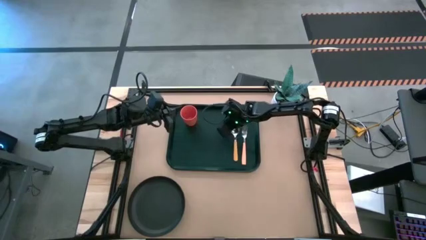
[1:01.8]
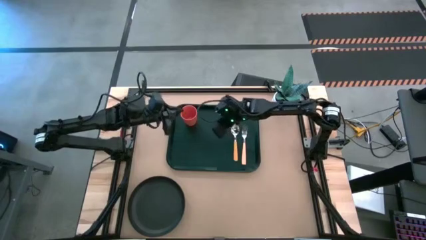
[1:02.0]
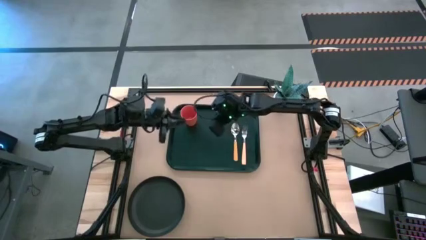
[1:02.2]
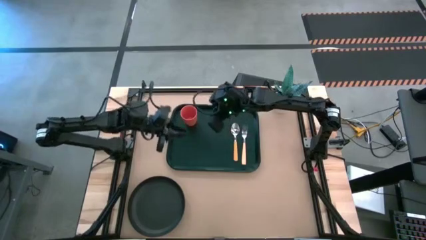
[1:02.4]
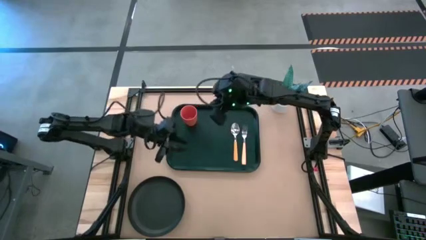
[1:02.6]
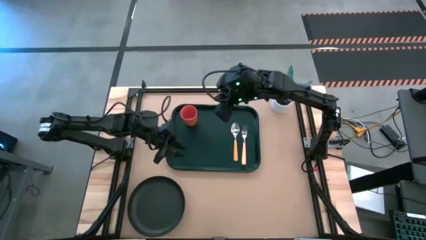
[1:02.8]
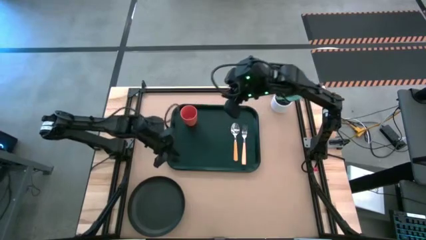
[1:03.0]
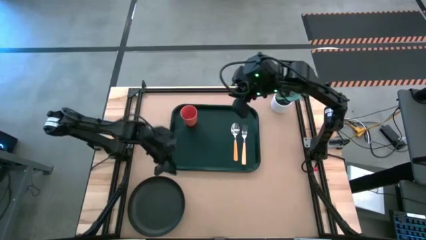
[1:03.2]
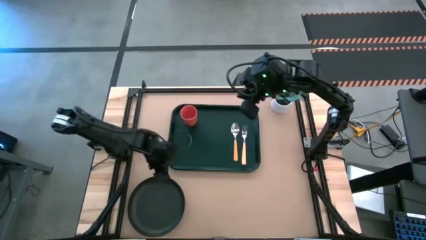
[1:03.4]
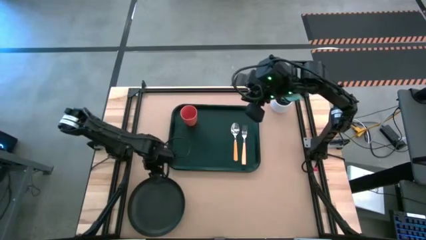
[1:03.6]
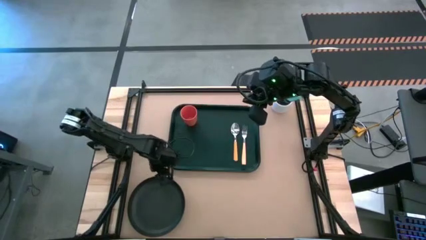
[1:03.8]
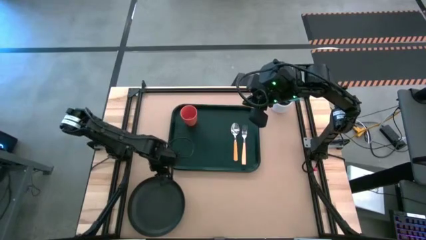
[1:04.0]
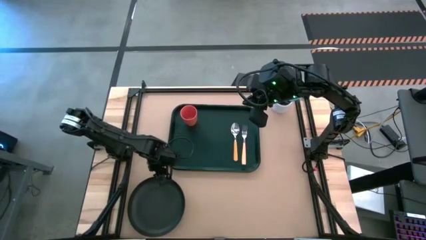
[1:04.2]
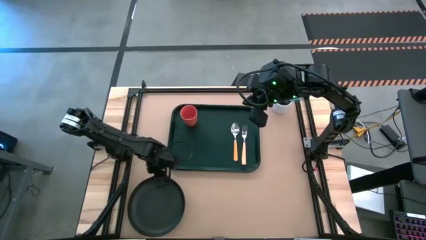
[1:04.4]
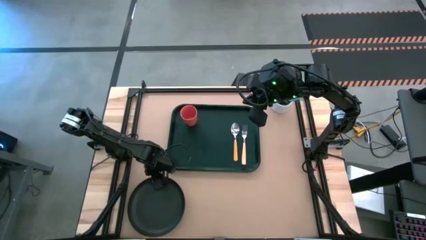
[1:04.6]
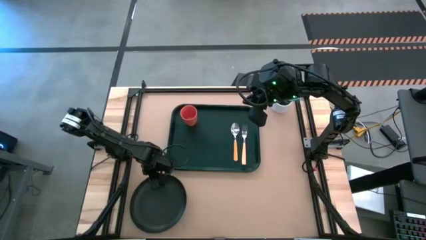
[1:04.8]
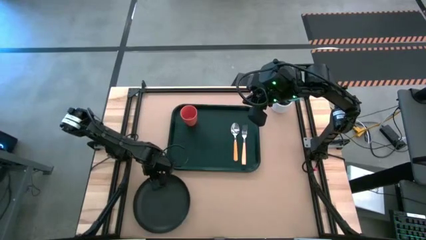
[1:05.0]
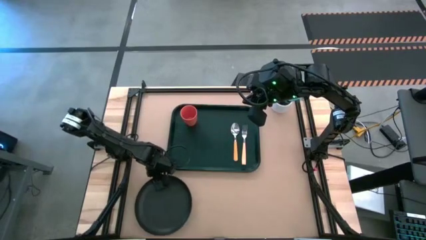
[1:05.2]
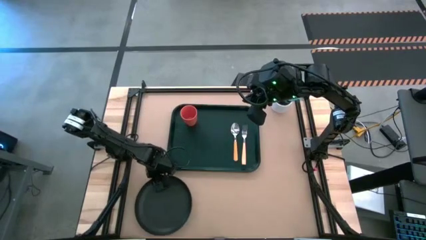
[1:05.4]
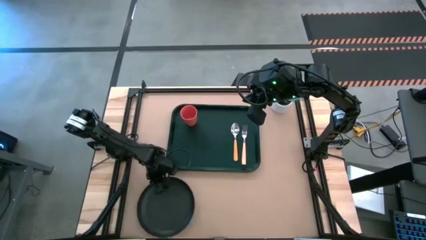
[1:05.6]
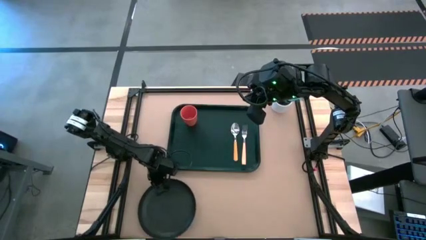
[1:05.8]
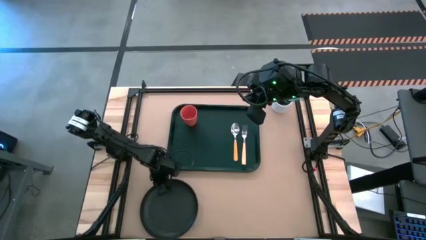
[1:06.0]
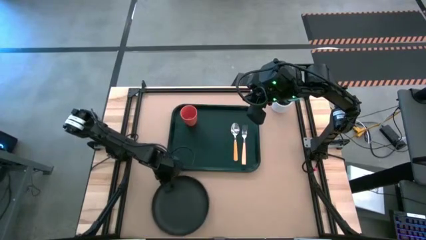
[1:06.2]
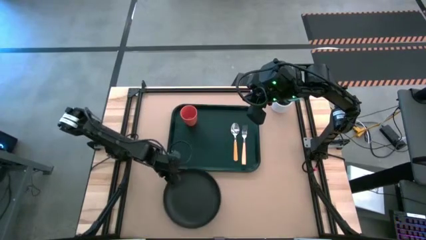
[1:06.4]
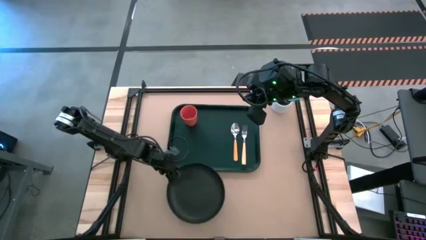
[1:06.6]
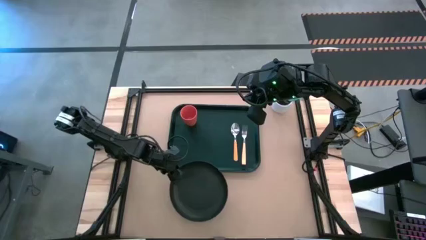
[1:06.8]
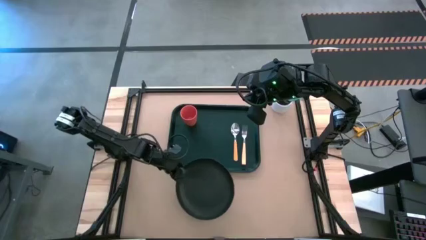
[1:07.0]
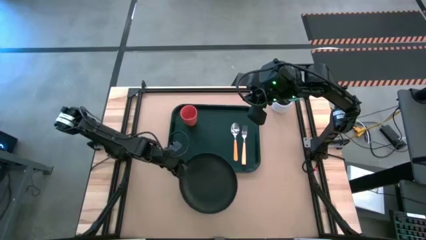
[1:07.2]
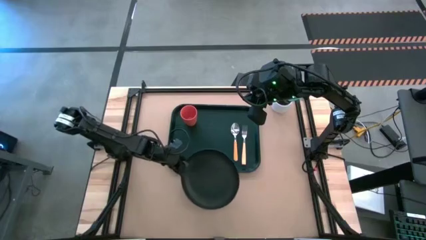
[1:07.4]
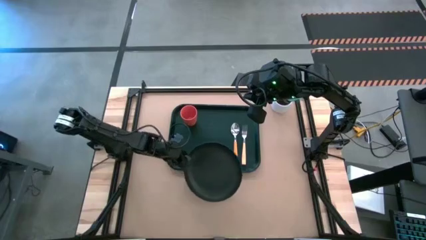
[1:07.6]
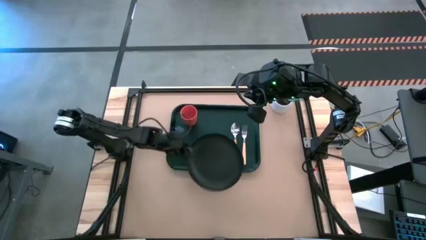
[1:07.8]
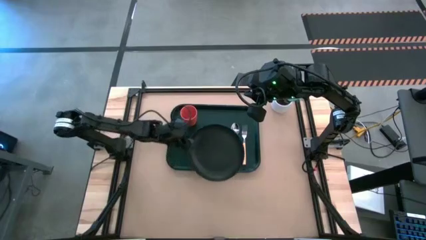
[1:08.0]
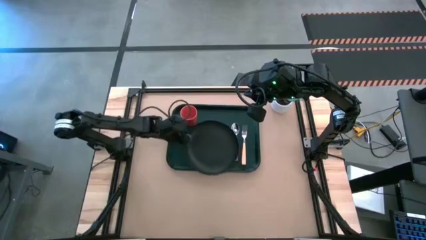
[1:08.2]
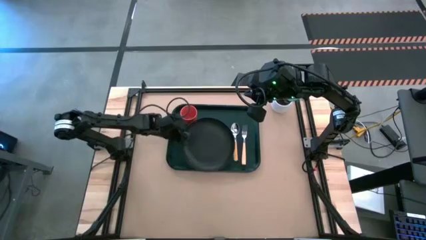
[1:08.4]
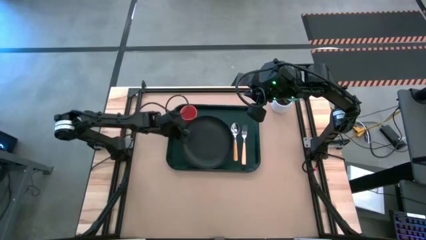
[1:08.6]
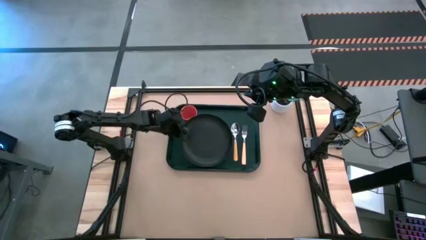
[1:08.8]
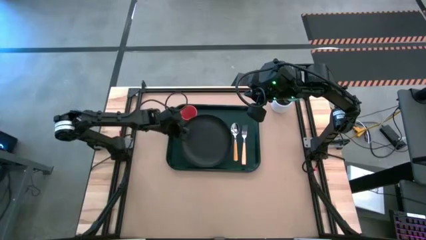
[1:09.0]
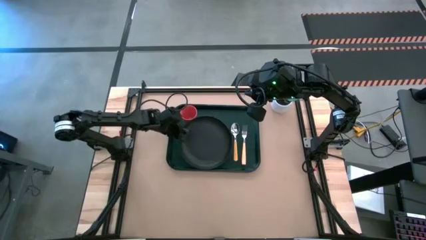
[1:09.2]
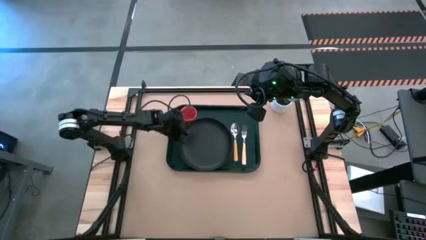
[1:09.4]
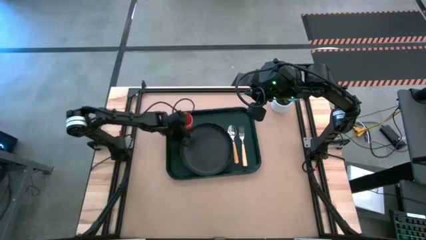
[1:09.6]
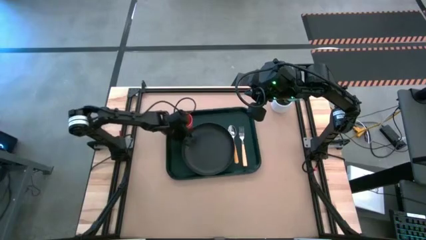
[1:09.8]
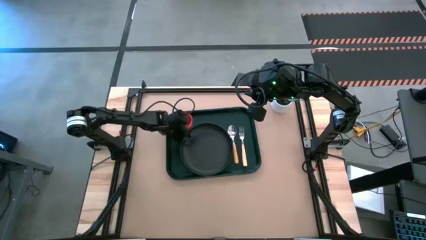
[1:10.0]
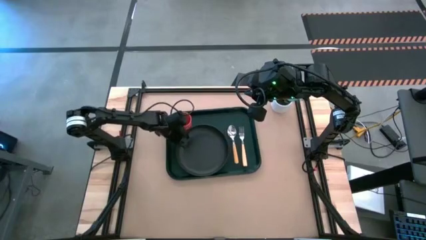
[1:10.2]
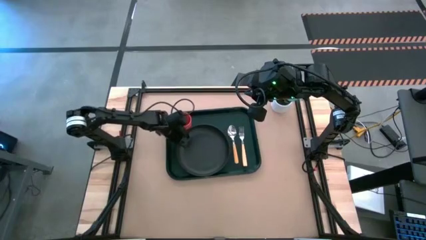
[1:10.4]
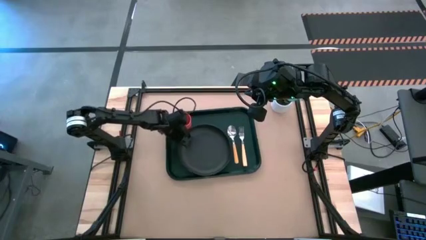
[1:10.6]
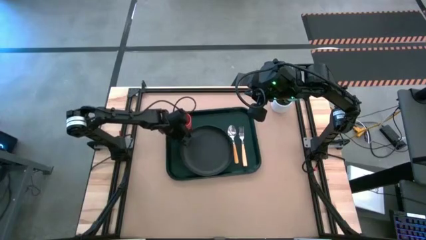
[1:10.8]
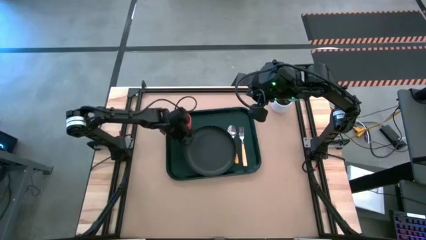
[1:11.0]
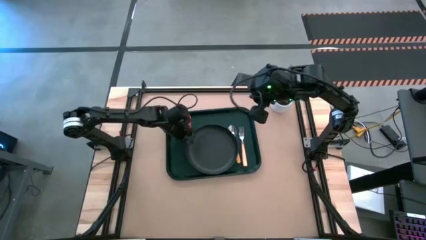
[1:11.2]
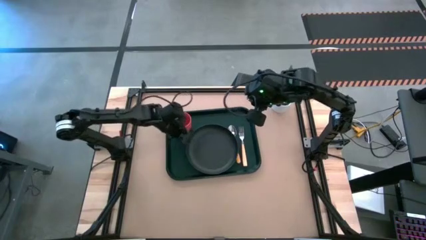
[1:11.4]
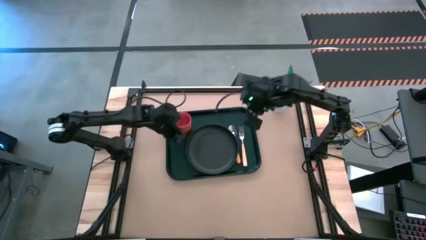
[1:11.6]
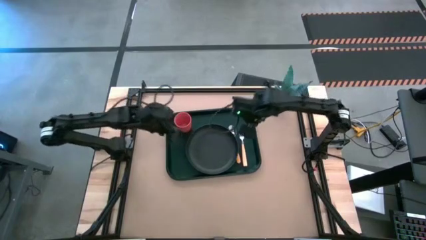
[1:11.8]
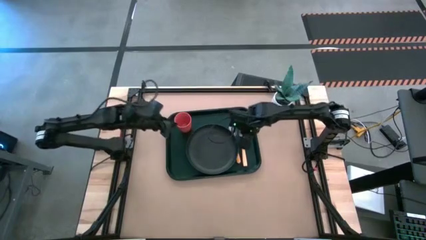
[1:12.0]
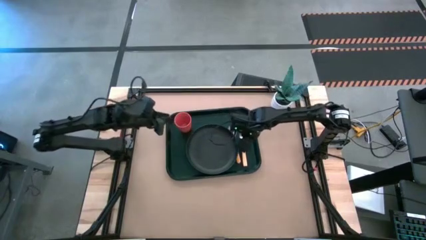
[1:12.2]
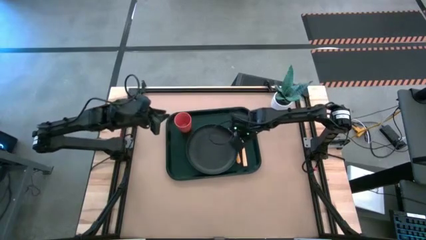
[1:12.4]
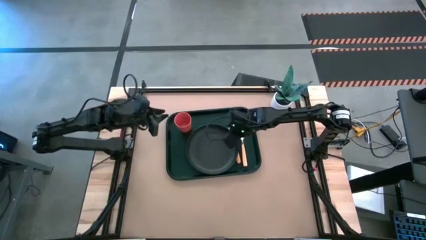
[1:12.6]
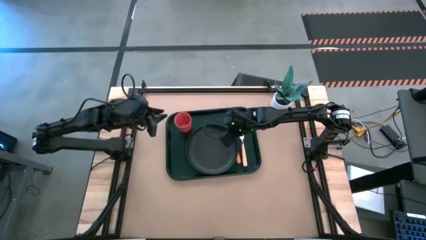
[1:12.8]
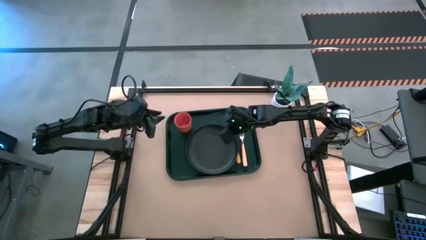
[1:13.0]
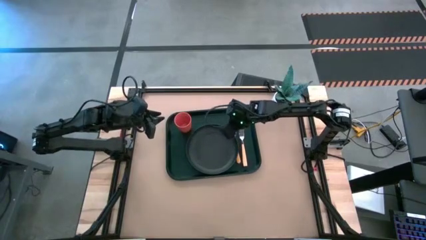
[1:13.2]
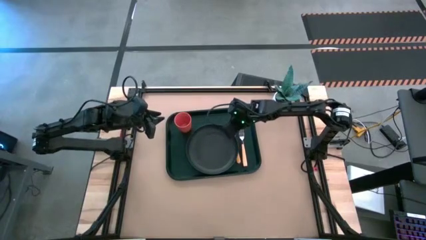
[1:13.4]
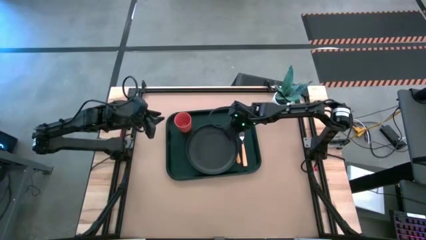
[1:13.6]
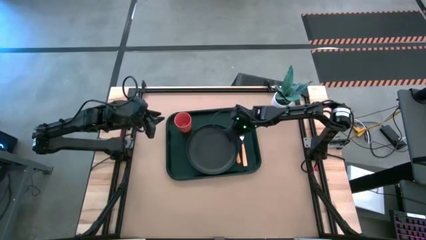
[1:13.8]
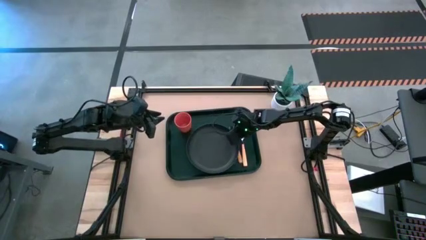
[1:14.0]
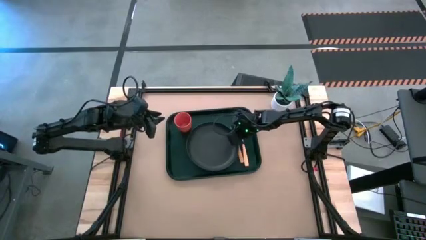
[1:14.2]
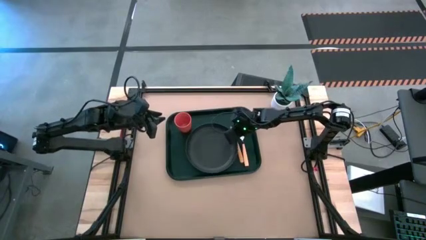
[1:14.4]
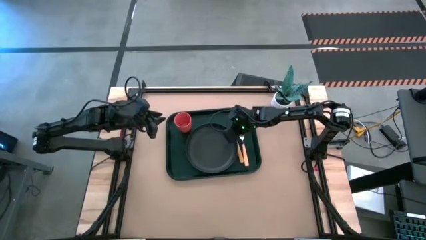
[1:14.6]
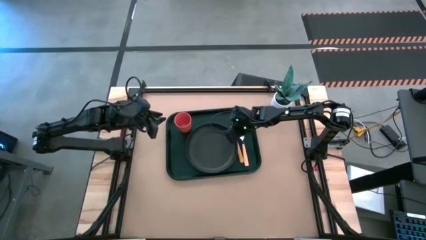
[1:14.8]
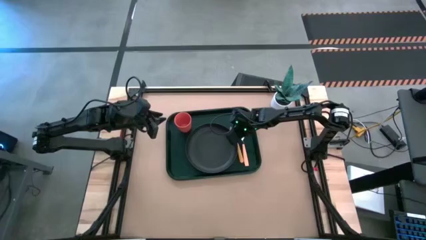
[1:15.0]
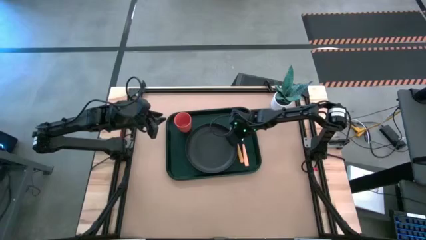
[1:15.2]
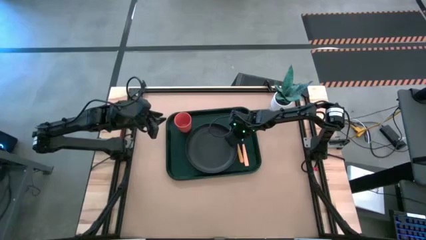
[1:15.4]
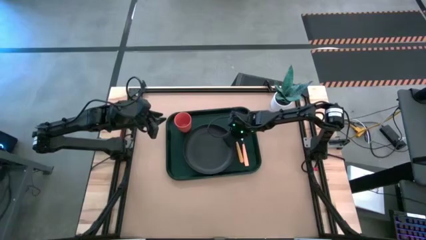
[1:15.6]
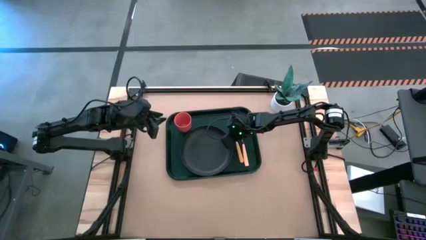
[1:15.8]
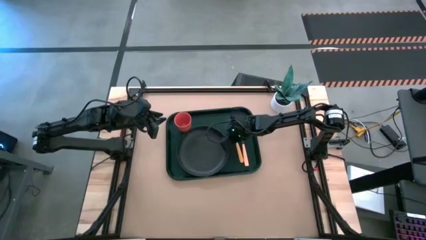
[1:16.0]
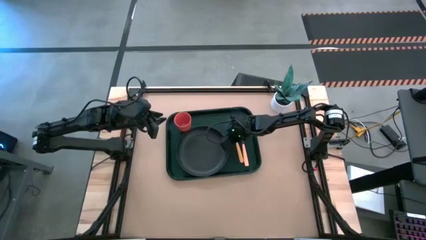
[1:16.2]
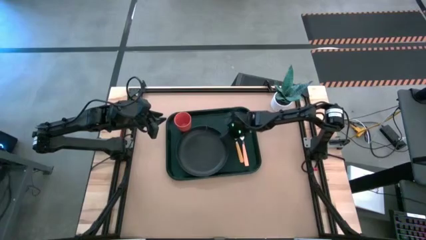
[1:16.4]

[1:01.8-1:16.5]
Task: Pick and place plate/cup/fork/spoon on tray
Put the black plate on the black tray

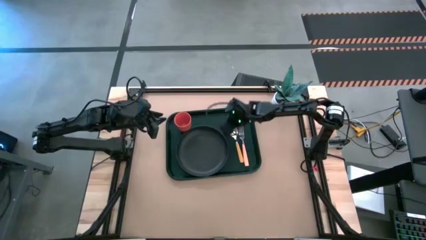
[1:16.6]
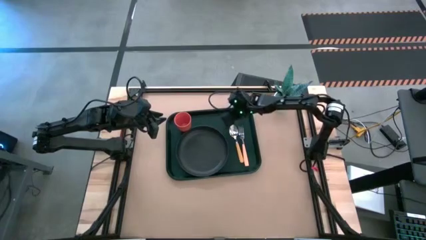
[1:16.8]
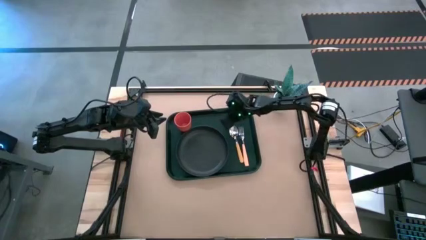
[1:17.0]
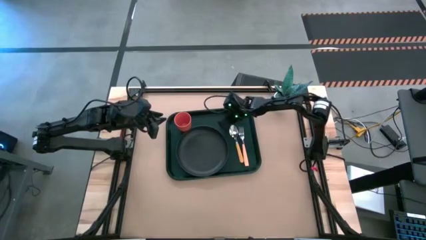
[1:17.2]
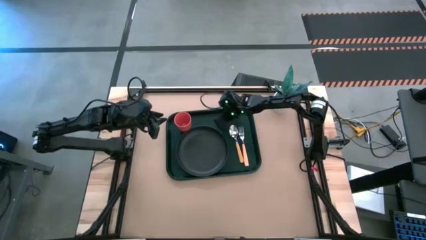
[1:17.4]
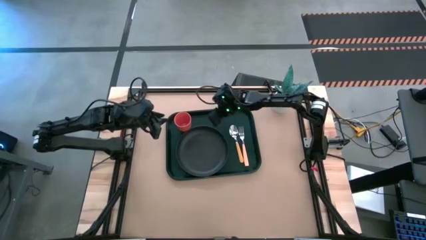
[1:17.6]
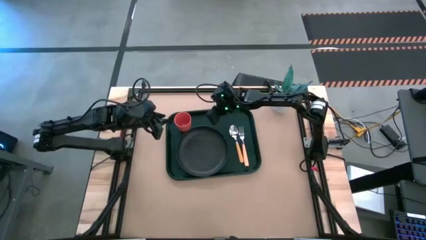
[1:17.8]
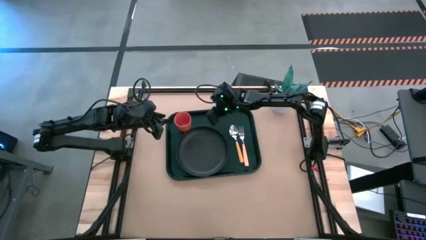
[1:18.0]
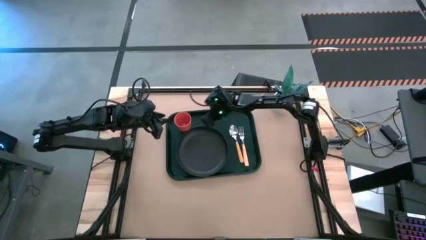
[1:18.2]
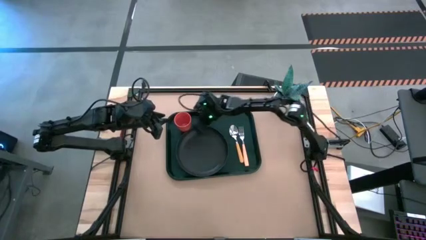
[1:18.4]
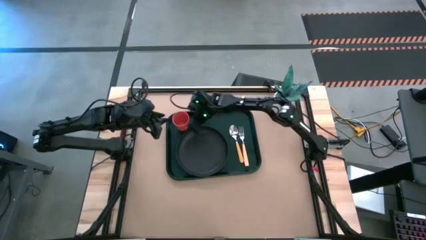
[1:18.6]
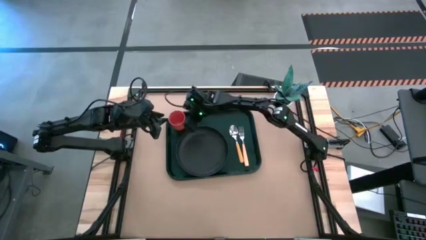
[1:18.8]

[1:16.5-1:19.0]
Adjust the orange cup on the black serving tray

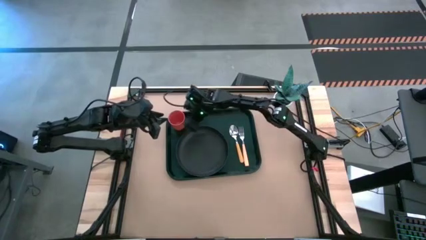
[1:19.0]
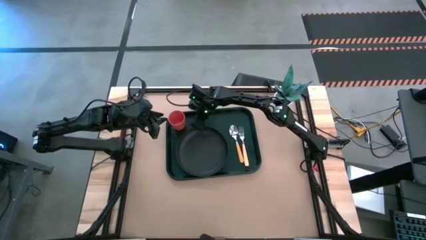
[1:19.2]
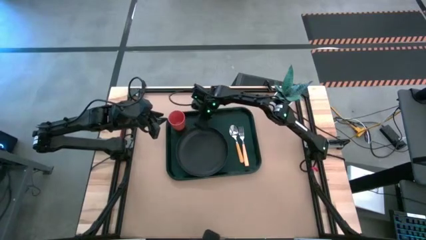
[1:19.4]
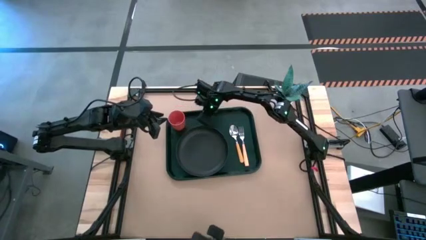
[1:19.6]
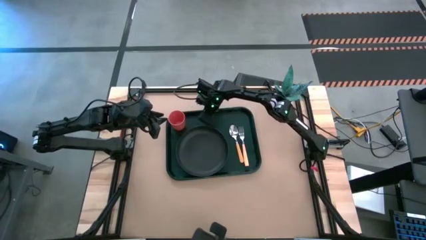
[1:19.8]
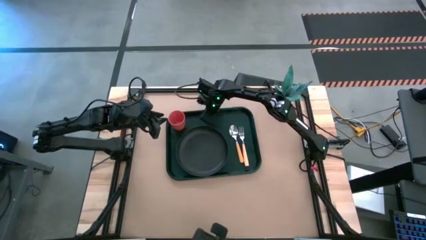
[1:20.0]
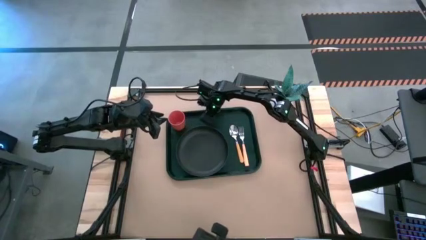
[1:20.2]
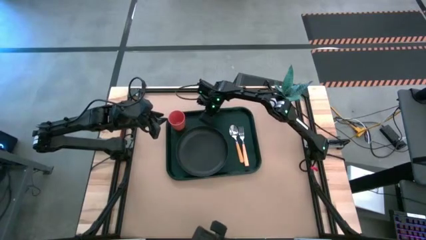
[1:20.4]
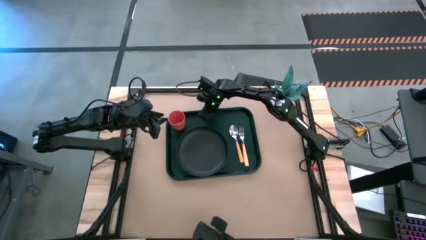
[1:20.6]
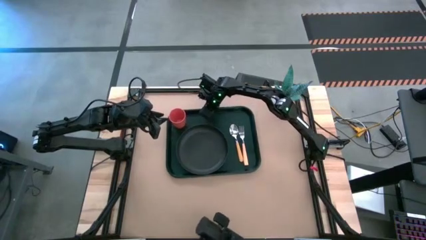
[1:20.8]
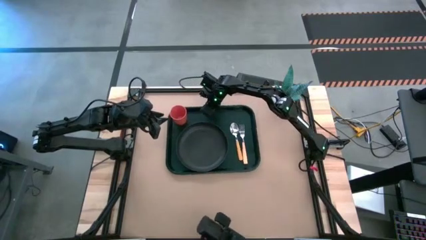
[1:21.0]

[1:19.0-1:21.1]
Adjust the black serving tray
